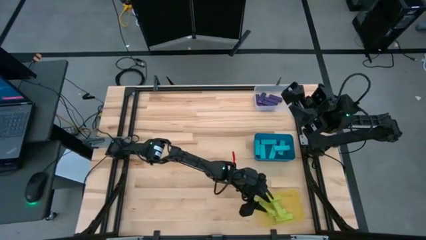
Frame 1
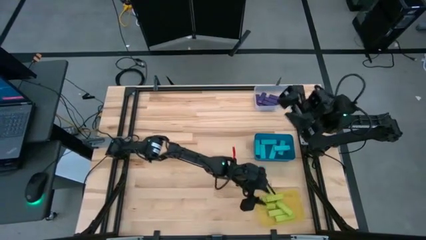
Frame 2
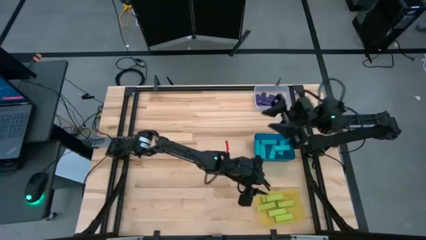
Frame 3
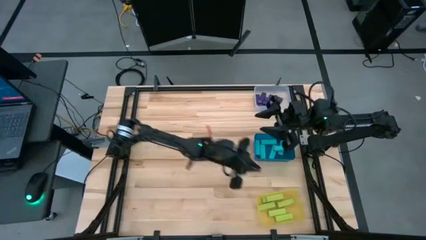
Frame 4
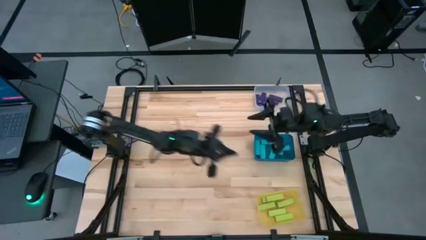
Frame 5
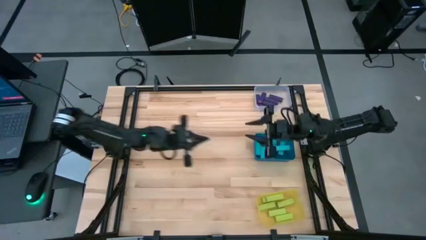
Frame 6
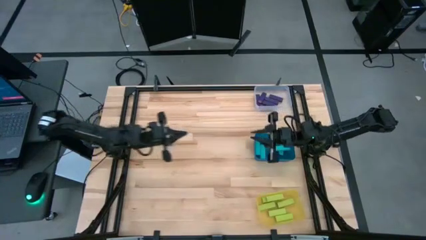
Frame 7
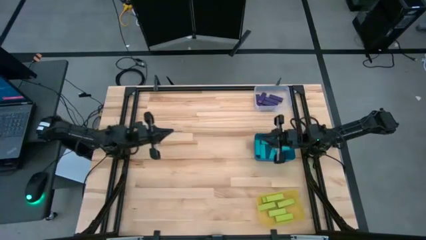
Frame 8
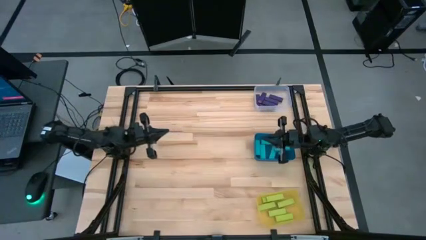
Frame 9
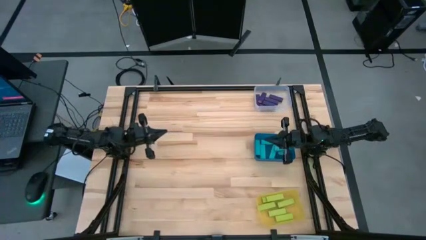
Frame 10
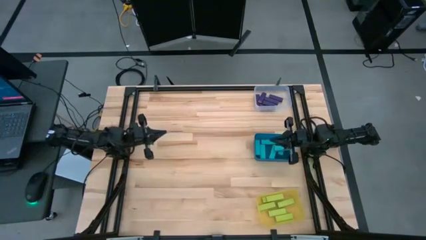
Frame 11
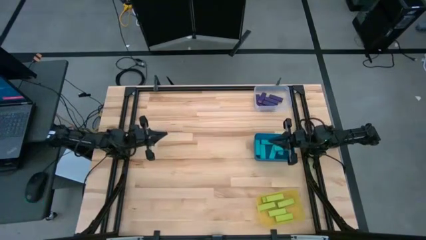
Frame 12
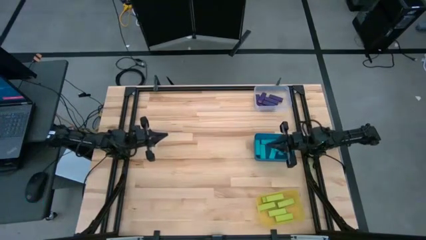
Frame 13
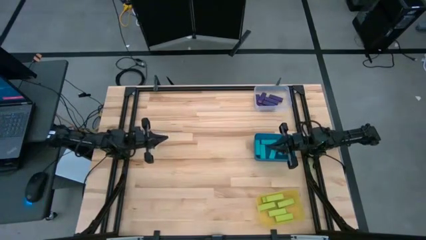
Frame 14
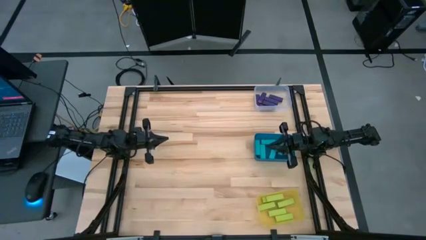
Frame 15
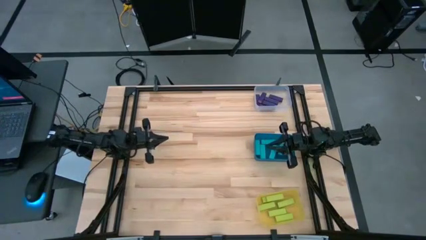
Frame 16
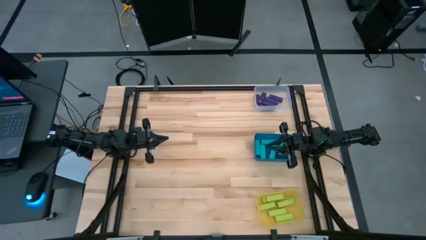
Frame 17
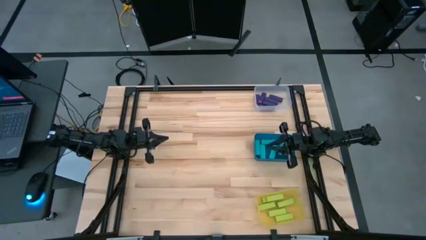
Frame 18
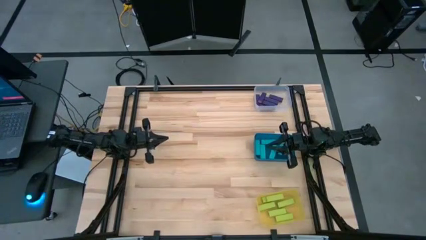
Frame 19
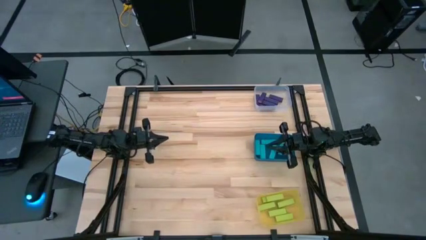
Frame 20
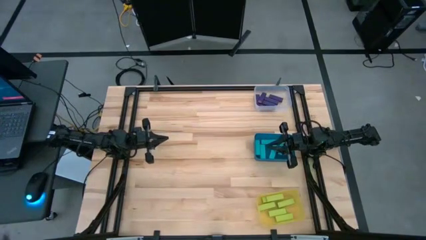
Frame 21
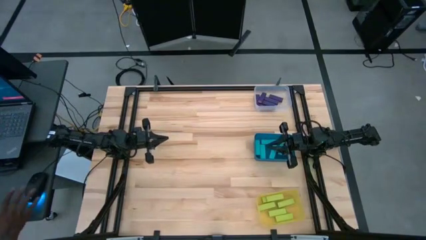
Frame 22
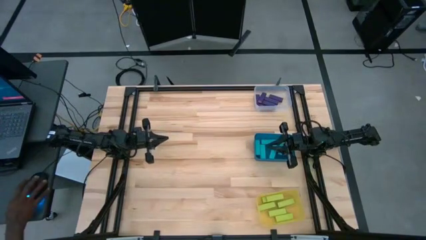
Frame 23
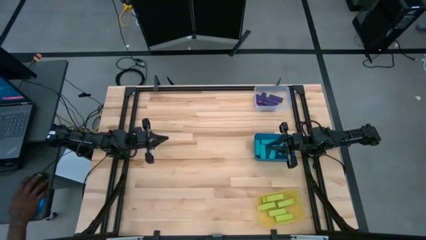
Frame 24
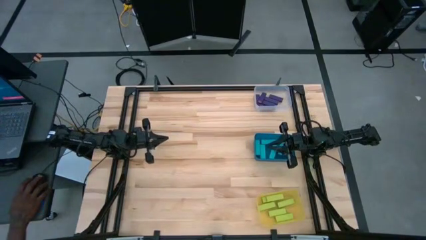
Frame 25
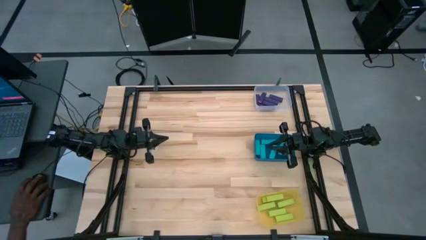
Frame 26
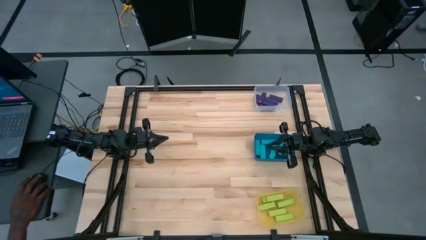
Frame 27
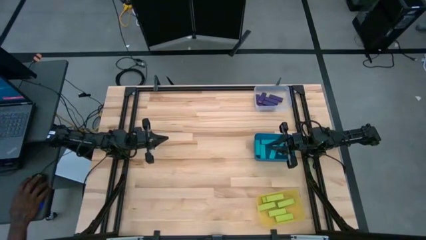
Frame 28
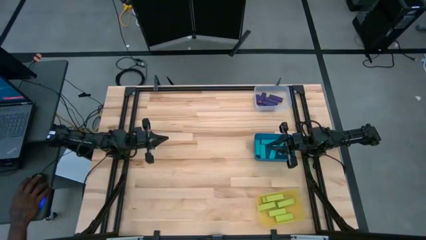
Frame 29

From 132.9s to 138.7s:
Task: Sort blocks
Return to Home Position

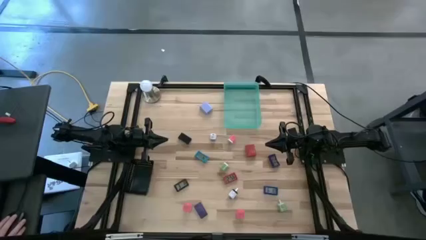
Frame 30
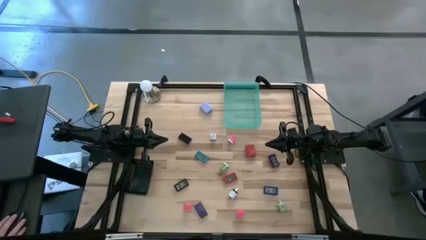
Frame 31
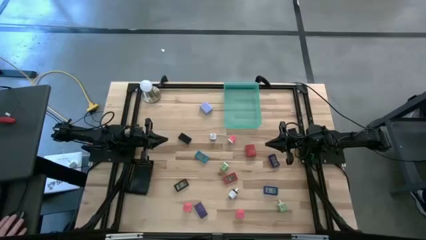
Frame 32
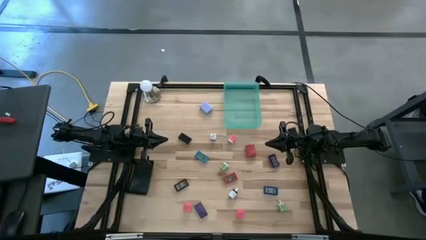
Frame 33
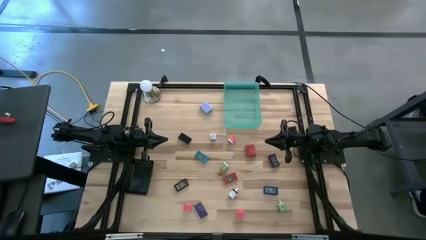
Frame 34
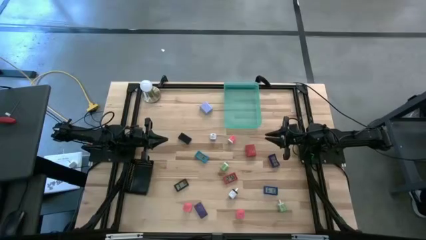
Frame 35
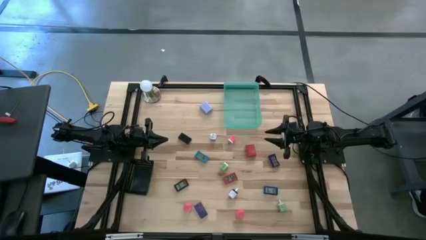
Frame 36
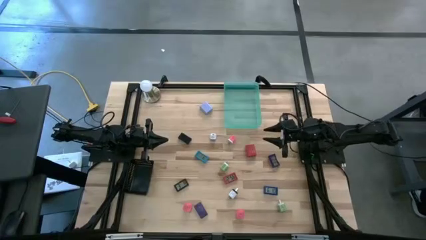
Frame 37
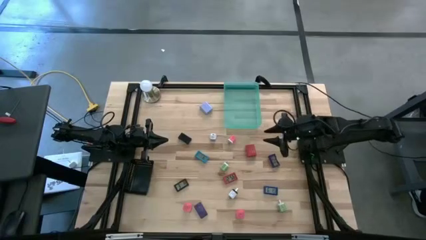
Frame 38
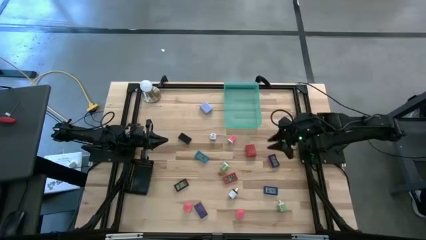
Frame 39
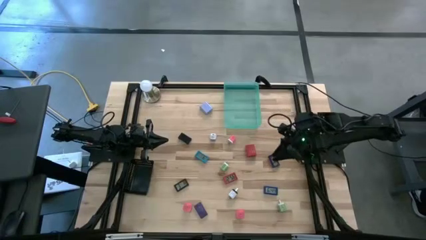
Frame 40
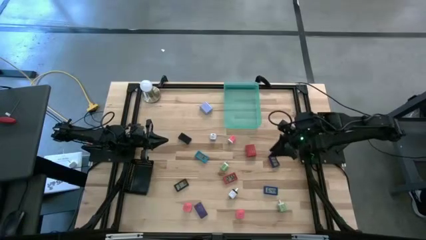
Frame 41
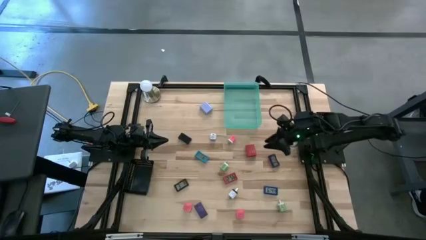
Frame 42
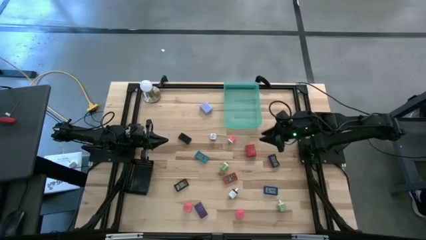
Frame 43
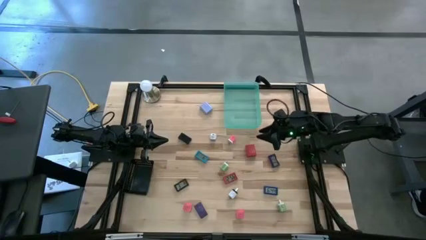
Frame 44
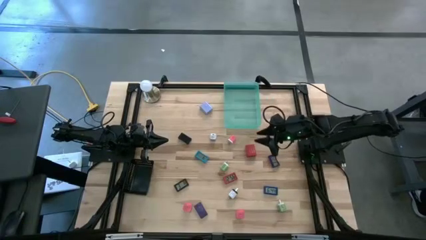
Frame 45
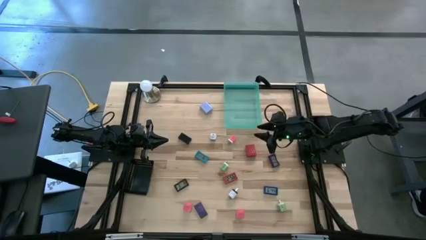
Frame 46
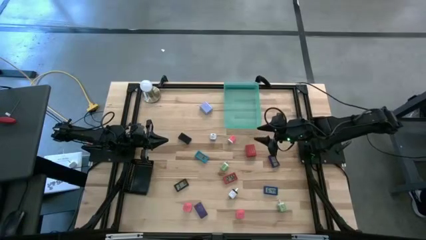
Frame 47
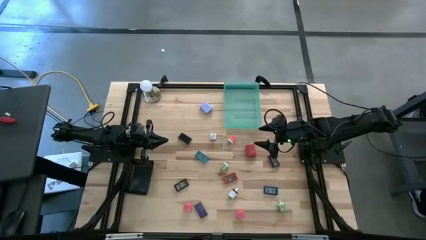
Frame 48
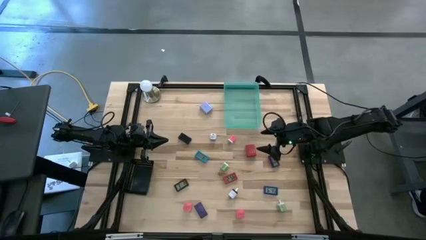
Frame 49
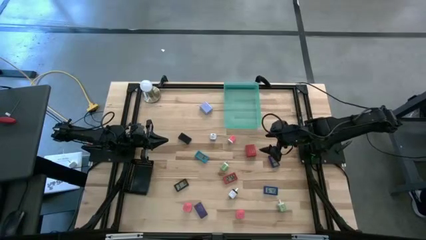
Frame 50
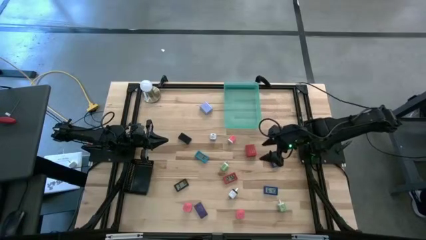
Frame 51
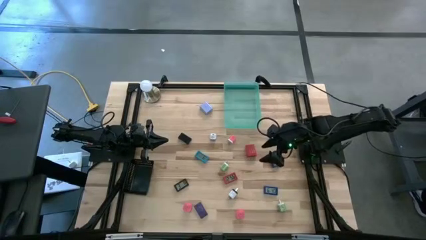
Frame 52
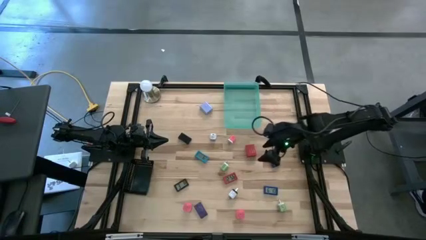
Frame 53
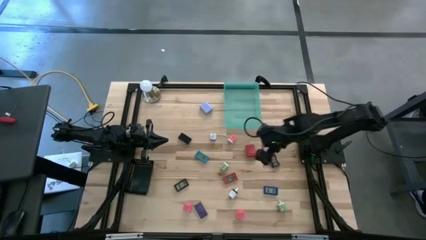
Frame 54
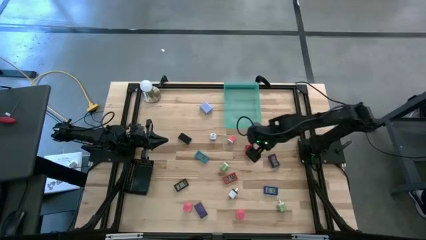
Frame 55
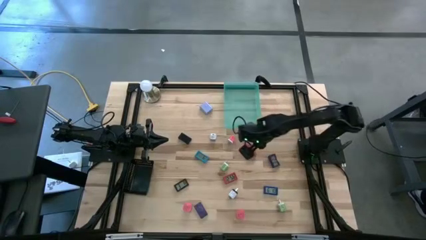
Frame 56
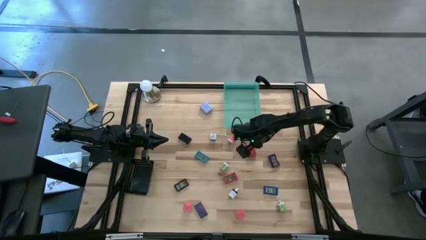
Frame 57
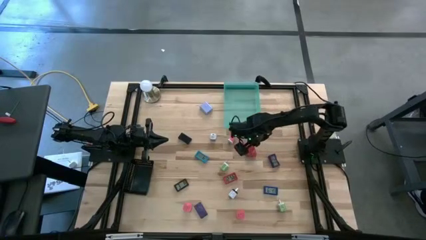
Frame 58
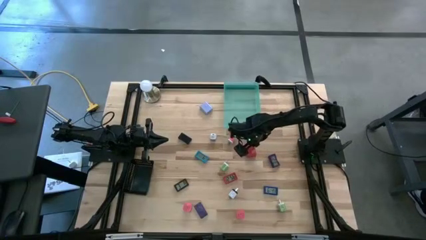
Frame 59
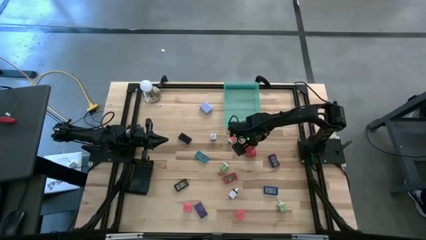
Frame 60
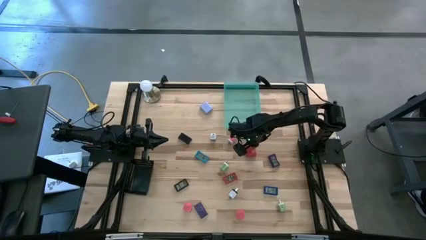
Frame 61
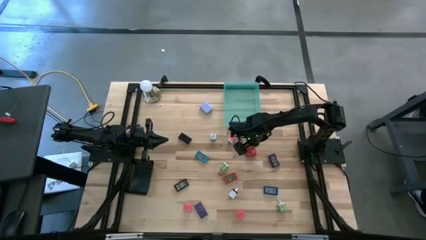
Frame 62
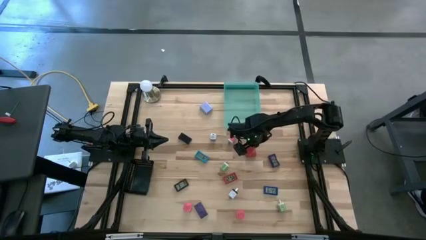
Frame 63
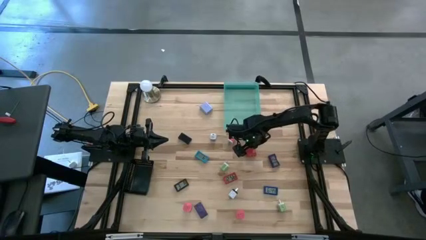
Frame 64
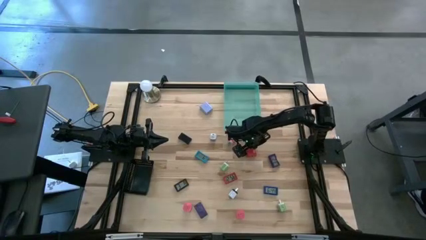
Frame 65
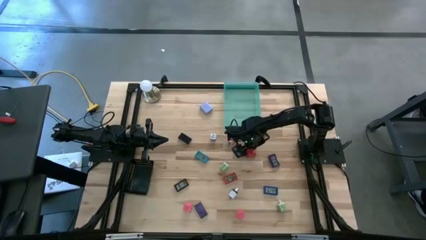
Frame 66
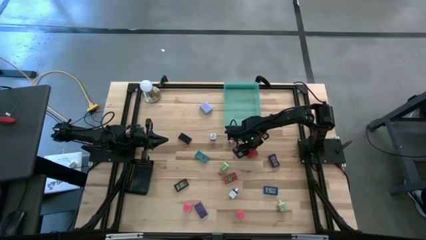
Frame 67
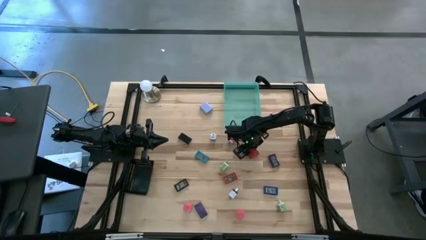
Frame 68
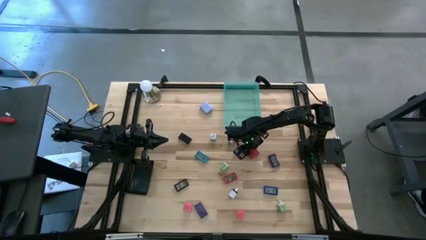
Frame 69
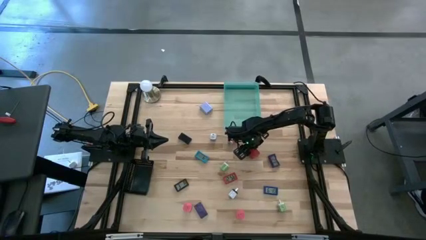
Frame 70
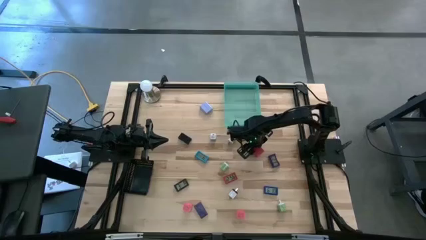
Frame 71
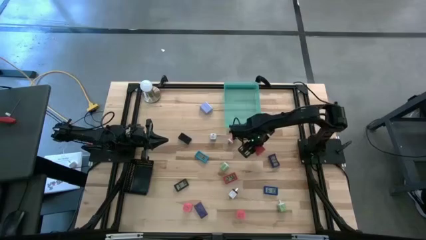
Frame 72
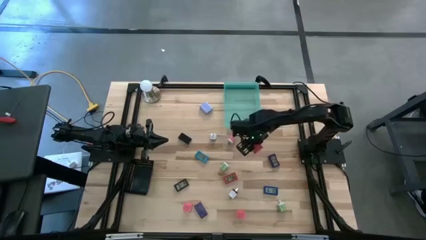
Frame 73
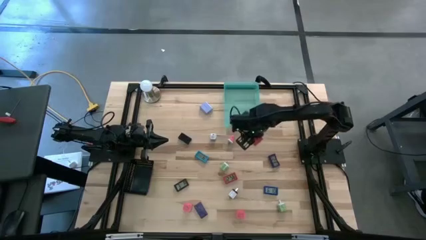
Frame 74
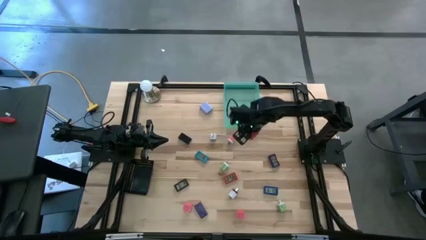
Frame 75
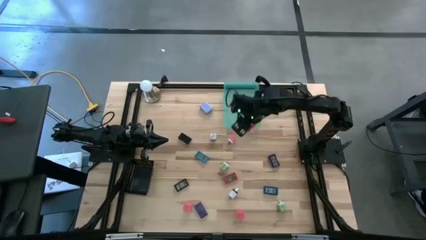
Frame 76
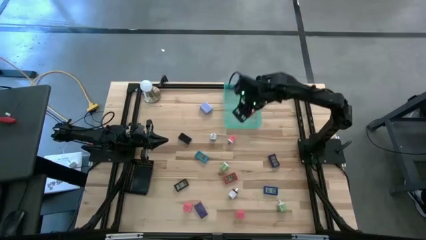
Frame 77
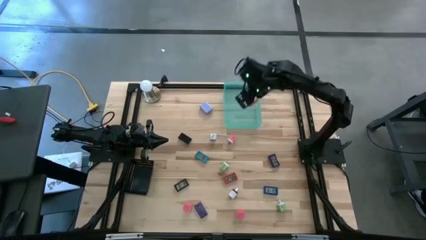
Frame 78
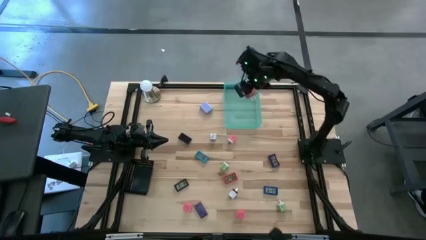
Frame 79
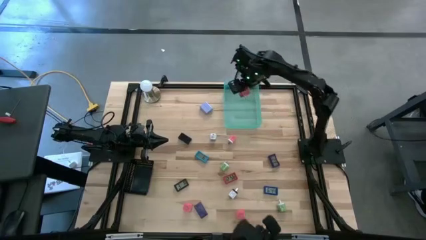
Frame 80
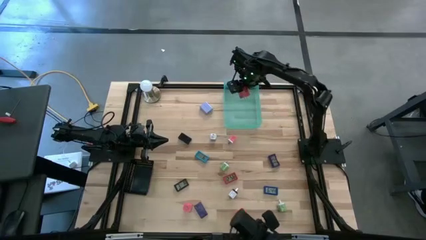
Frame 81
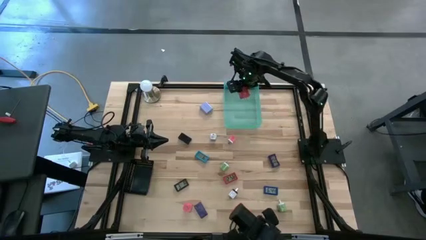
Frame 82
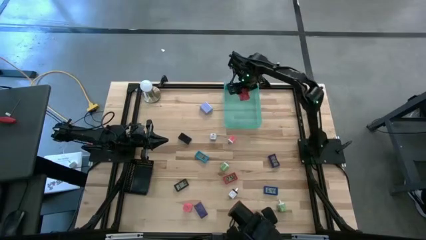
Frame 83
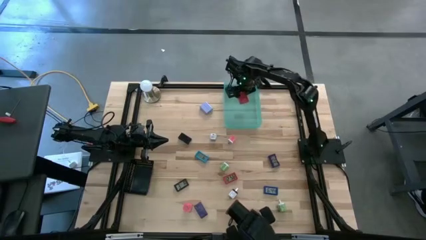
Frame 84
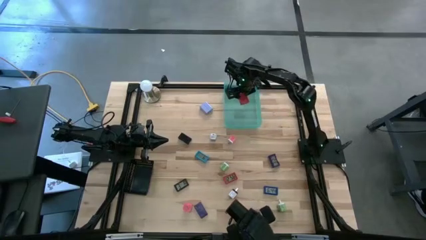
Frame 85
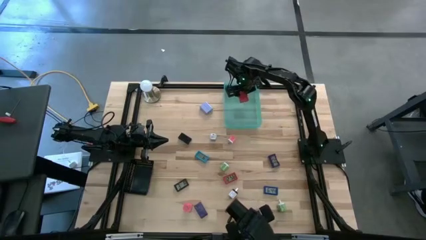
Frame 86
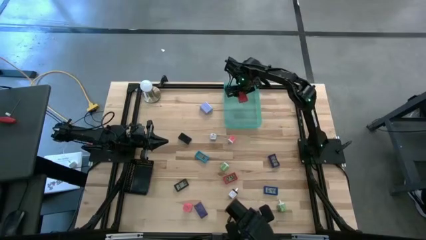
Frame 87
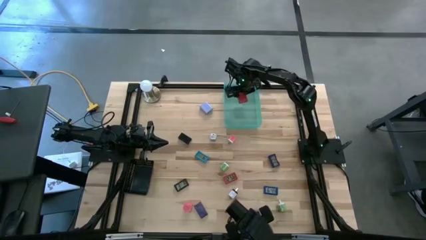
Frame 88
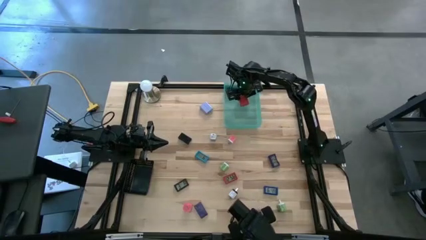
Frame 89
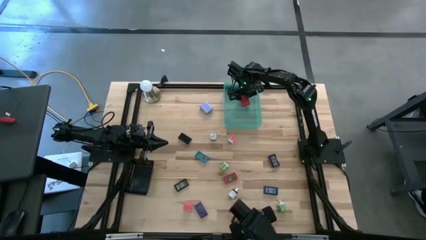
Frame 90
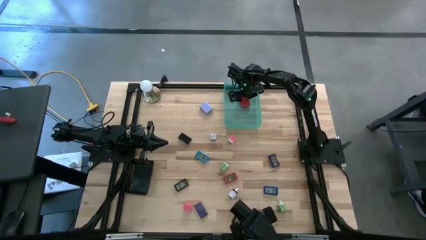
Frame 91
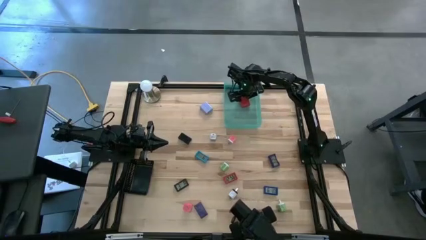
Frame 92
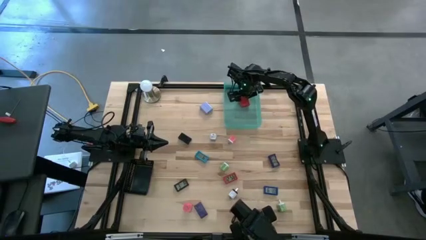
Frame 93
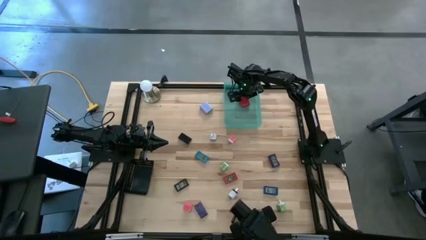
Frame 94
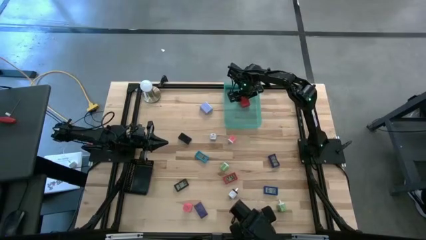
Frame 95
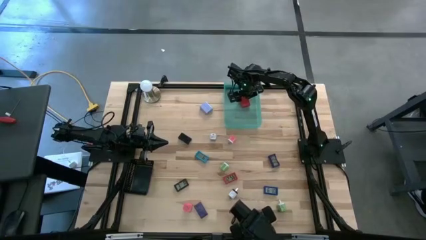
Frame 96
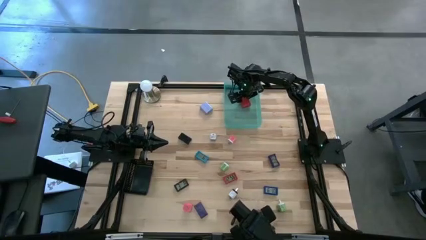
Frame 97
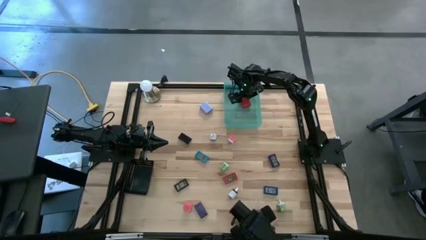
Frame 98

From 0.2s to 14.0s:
Task: Pick & Place Office items
Put the red charger adapter into the green bin
